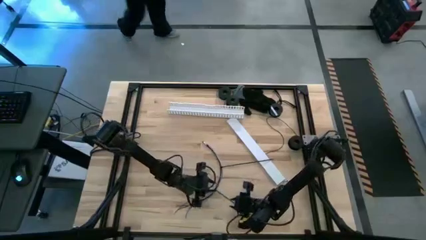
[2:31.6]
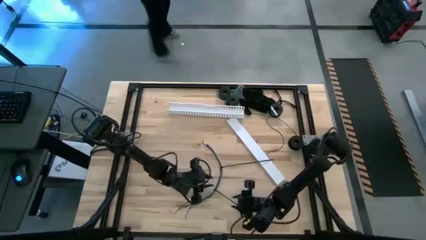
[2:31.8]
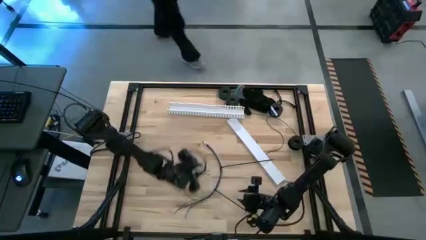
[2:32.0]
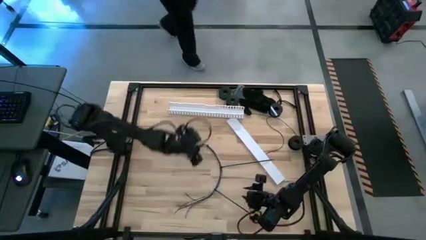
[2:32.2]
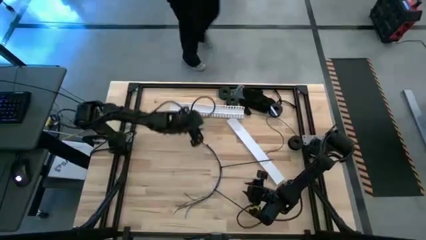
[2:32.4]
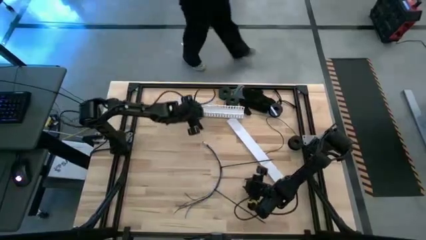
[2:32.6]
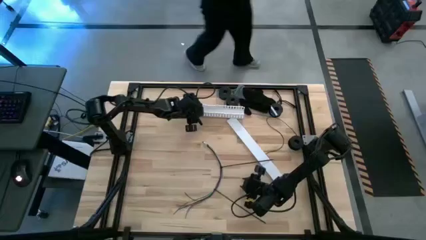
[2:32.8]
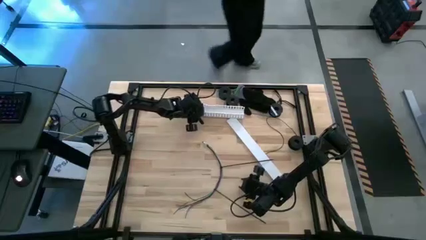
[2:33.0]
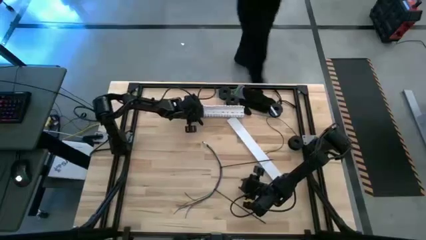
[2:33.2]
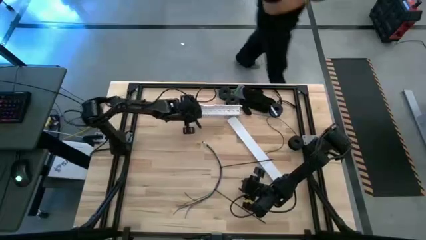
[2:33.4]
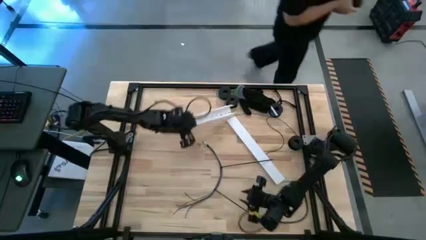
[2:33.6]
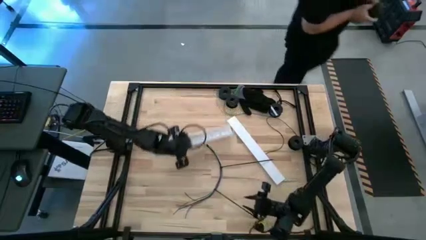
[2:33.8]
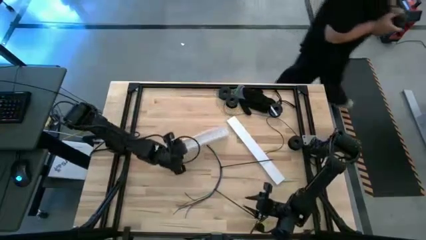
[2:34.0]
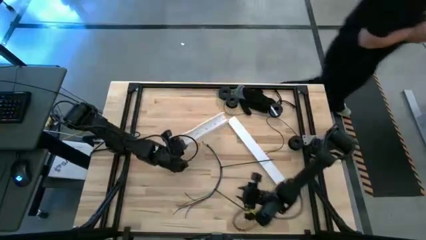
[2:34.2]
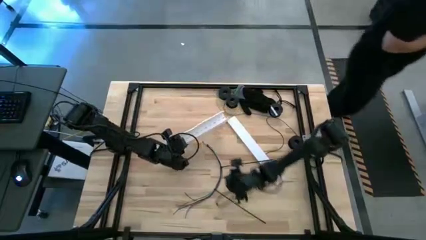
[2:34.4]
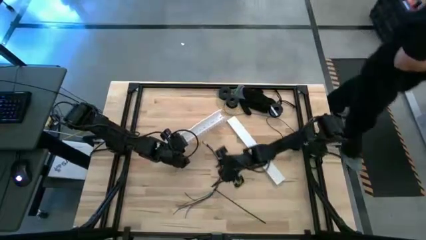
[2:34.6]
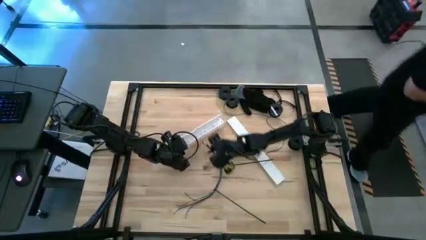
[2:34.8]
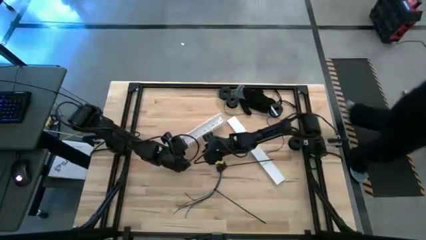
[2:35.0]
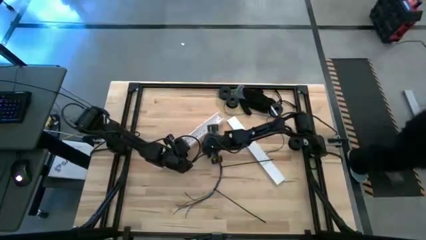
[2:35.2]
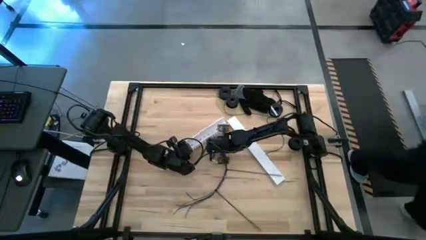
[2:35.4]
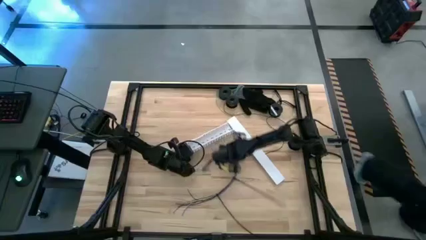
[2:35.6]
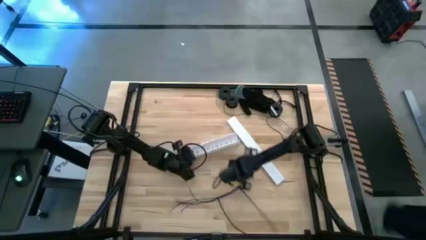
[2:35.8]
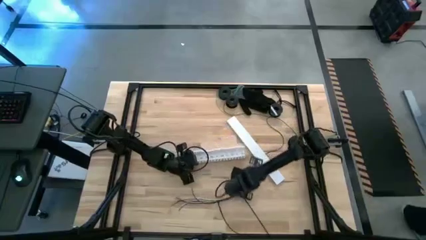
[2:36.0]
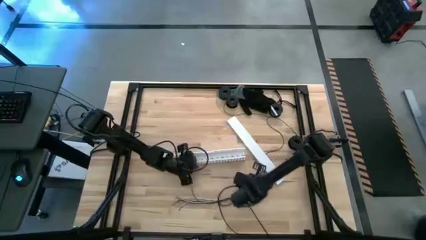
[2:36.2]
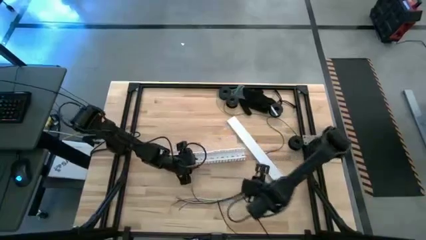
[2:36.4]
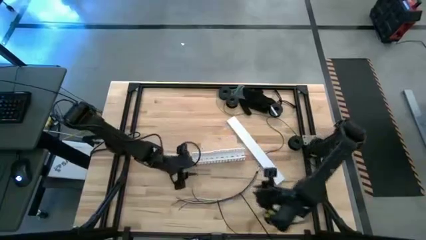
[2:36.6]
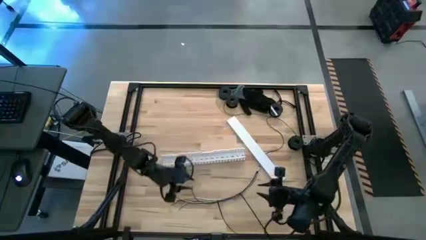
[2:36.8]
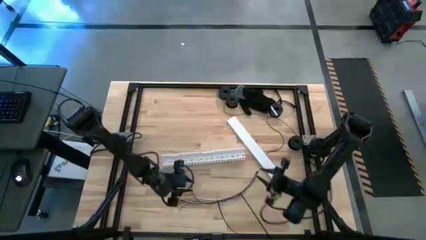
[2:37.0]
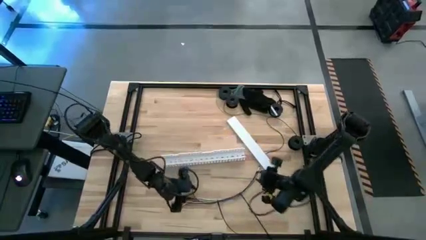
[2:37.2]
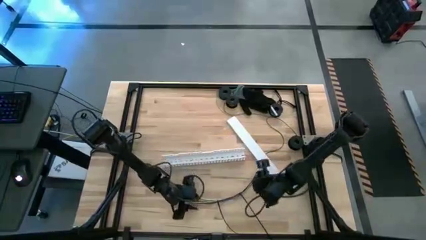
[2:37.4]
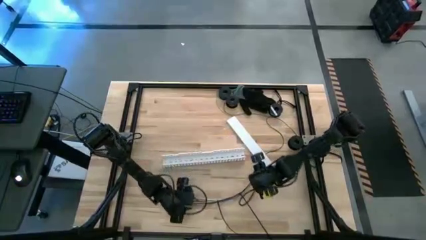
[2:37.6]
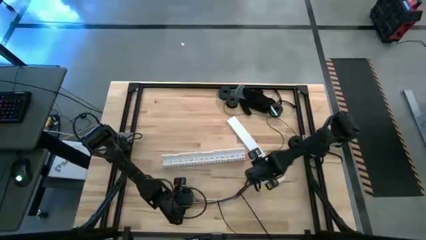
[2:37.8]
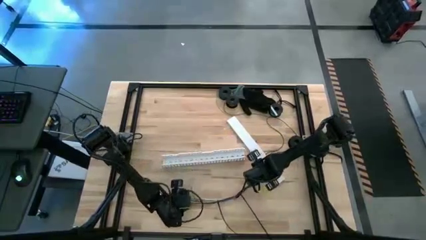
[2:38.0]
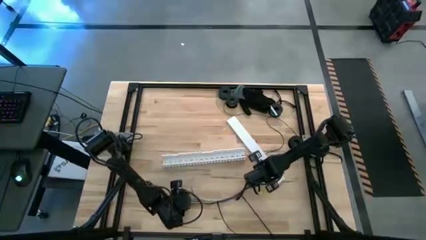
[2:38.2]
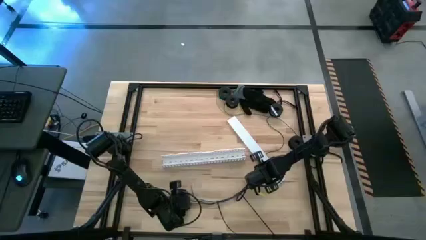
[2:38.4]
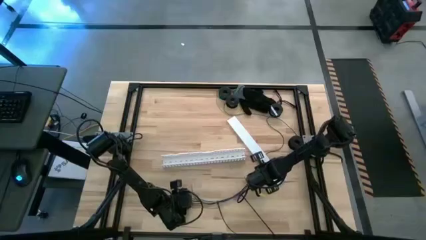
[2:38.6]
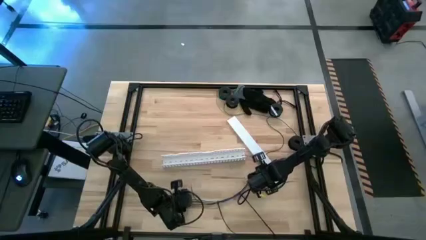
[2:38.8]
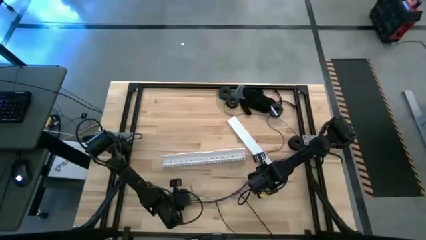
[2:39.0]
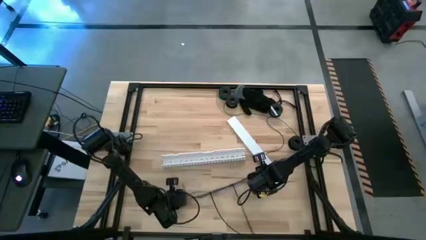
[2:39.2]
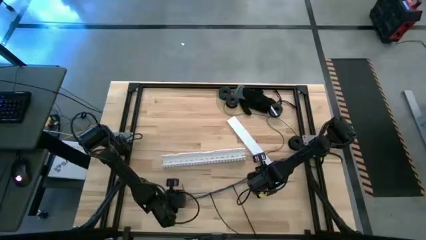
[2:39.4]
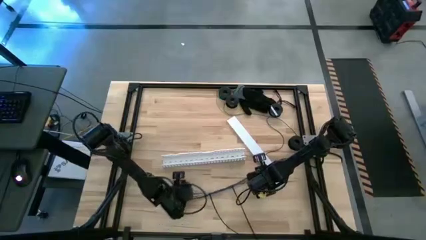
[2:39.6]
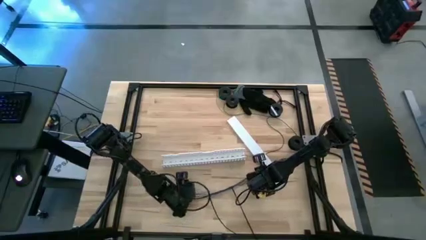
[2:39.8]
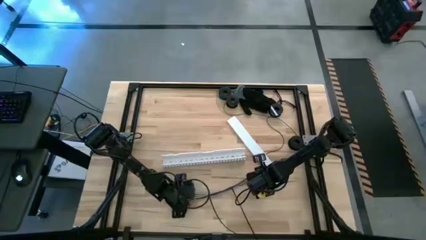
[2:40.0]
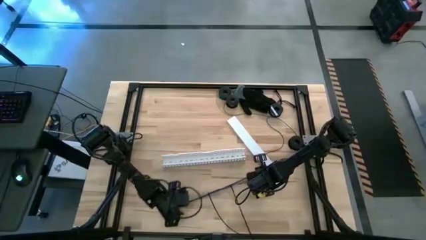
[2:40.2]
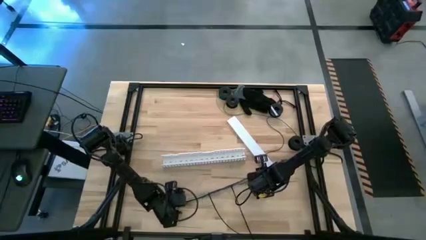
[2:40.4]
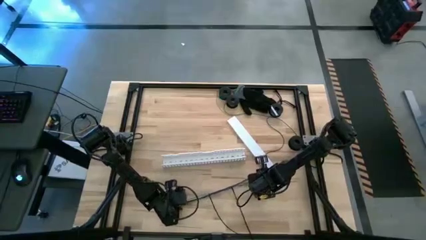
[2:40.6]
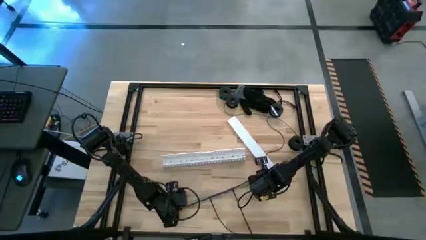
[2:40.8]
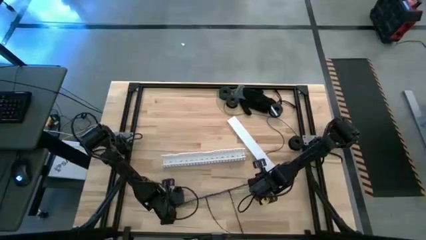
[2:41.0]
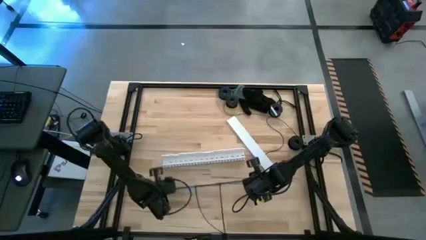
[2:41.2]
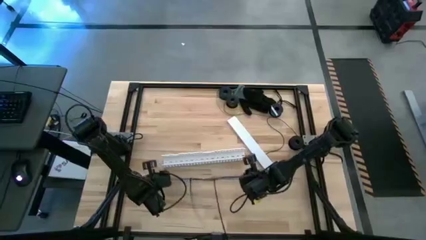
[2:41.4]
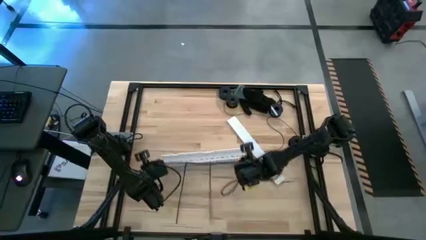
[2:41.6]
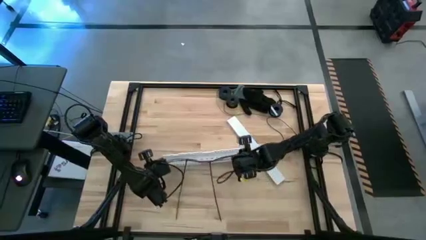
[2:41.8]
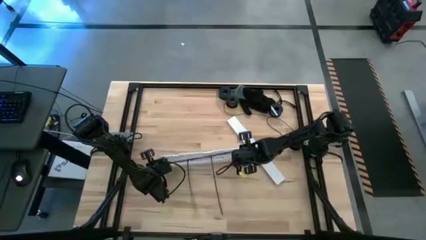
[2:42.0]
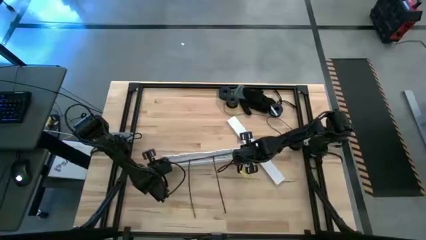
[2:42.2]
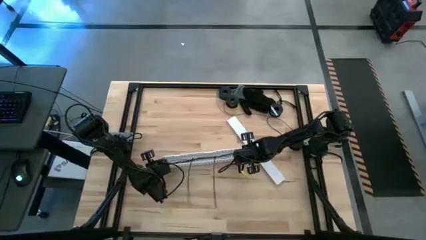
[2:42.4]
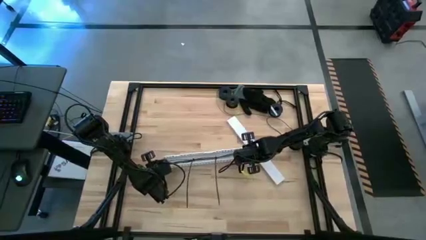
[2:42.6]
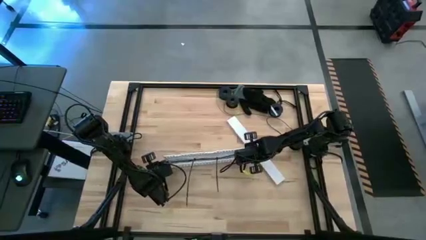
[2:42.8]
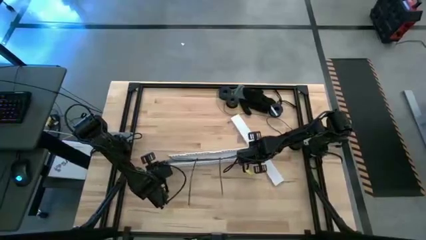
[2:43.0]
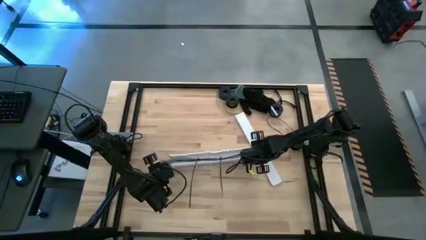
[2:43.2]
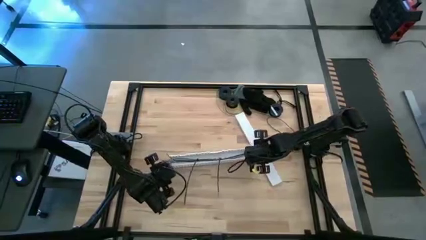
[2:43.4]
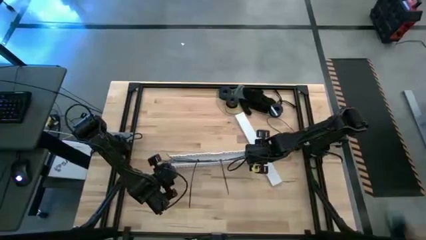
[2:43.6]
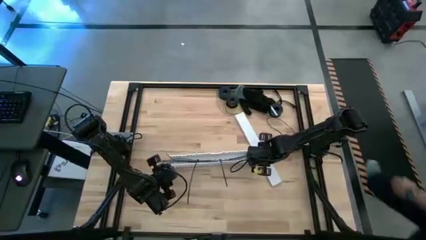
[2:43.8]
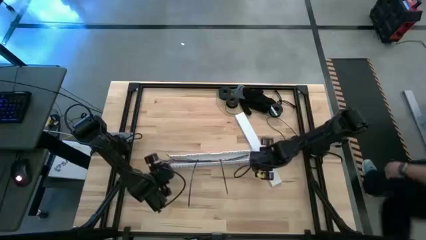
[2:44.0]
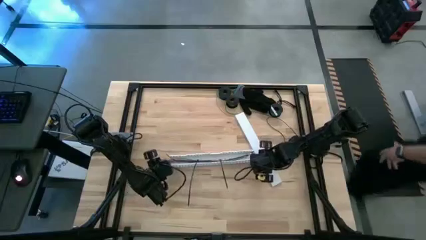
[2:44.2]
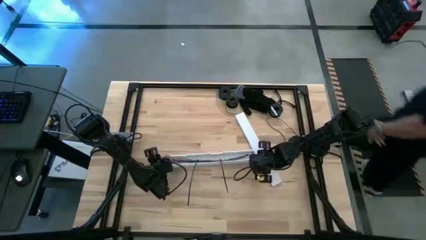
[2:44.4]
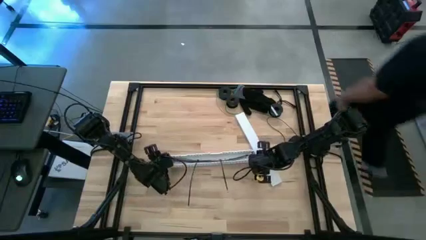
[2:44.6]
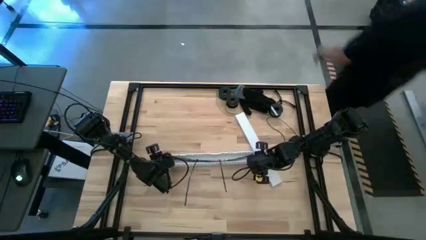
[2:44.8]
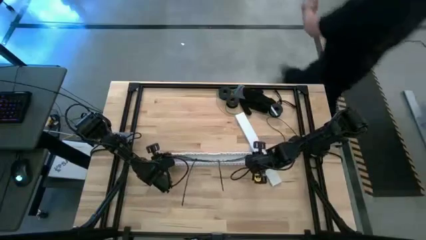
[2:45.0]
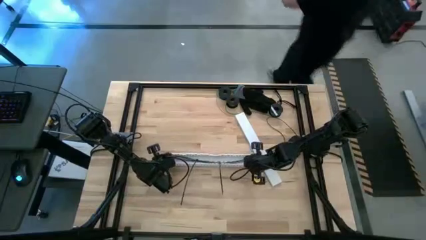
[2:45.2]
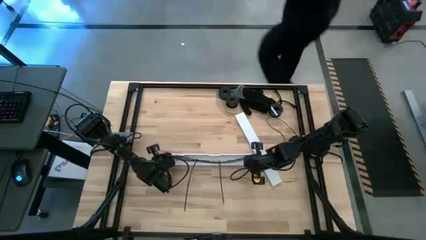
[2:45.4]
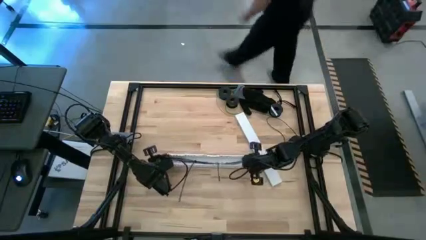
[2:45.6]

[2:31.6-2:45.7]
Task: Ziptie cables
Put the zip tied wire cables on the white cable duct

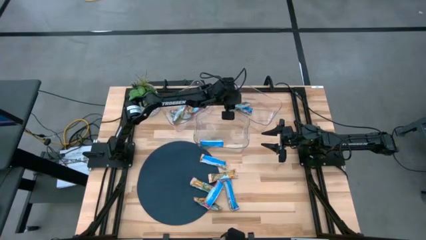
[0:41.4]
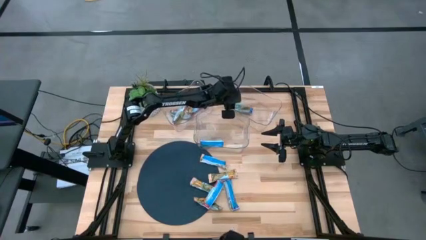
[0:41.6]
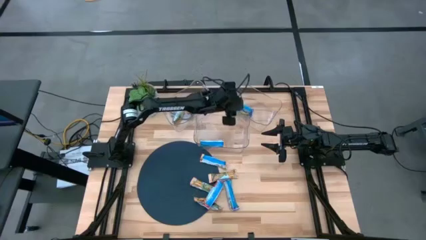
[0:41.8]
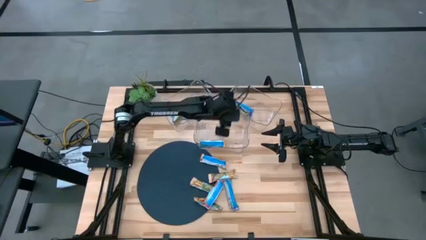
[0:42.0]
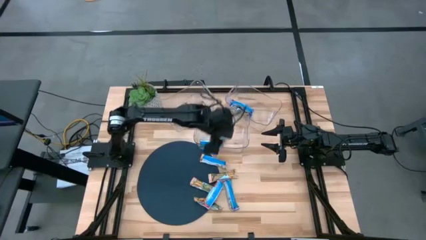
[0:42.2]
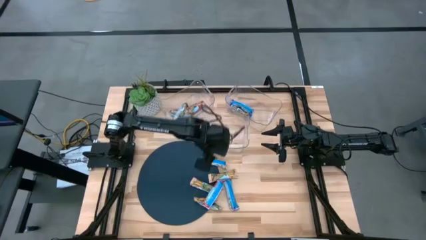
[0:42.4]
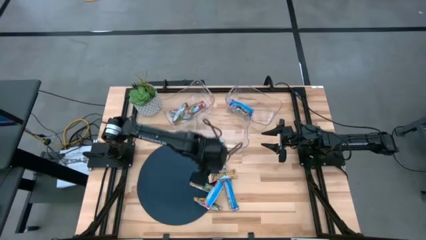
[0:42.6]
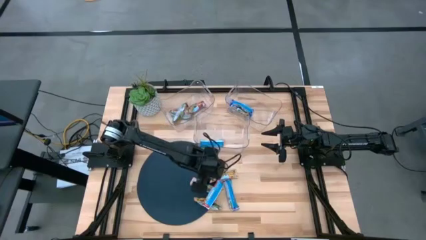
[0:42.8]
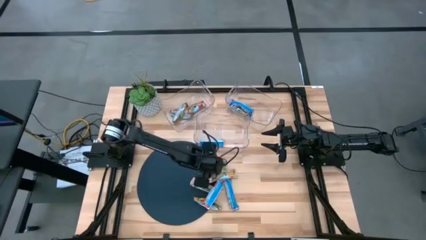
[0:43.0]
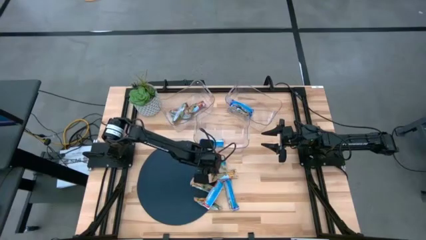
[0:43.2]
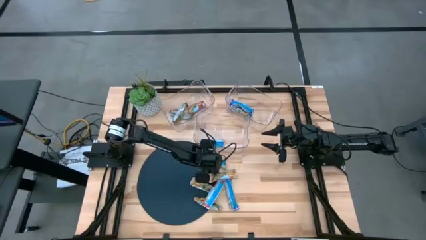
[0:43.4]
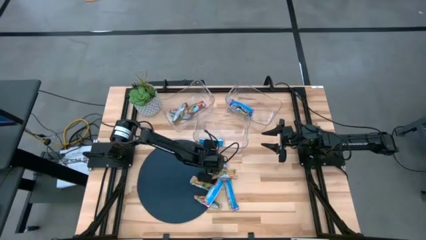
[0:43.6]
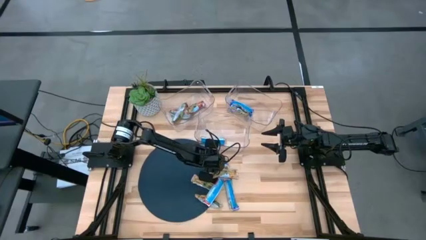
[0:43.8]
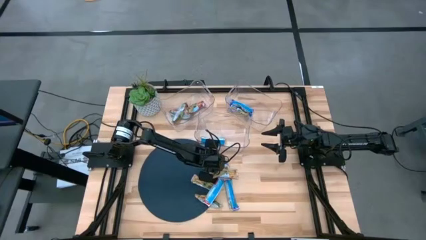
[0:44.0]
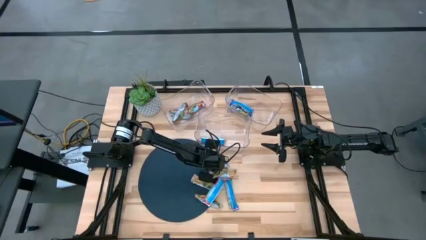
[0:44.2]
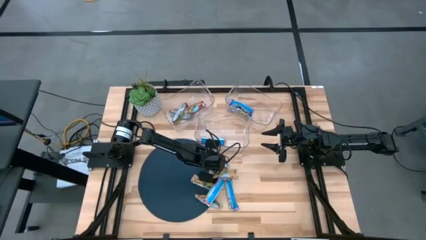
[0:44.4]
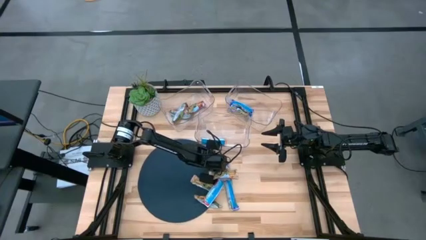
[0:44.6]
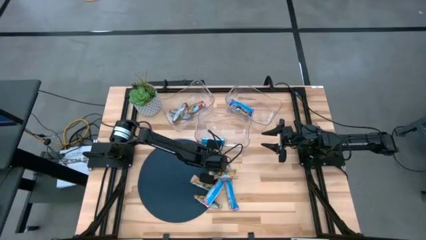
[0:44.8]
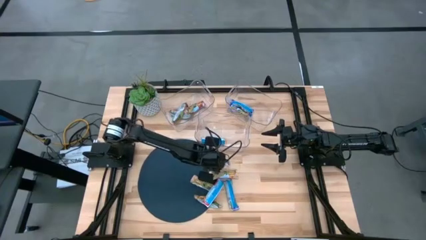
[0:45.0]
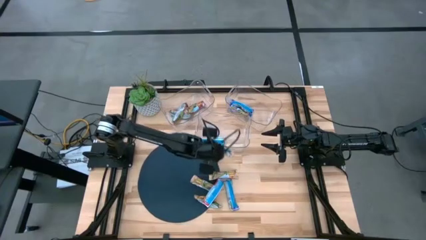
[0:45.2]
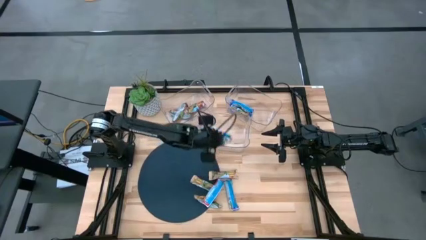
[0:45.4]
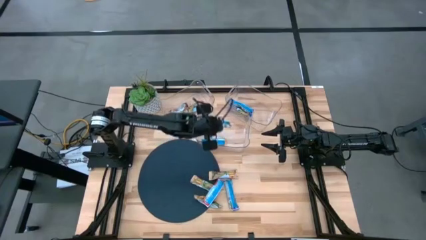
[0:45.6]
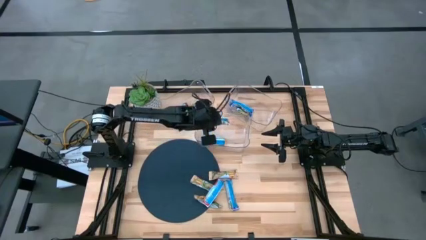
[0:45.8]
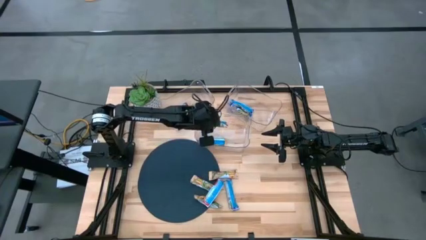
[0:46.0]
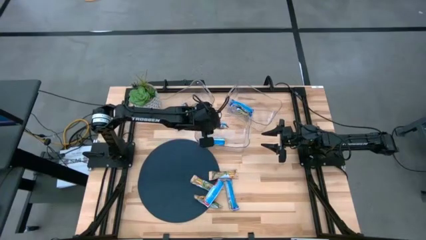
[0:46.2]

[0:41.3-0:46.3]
Task: Pick and place Granola Bars by type
Put the yellow granola bar into the middle transparent bin
